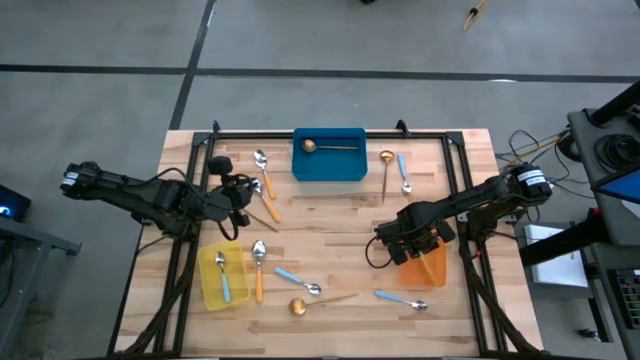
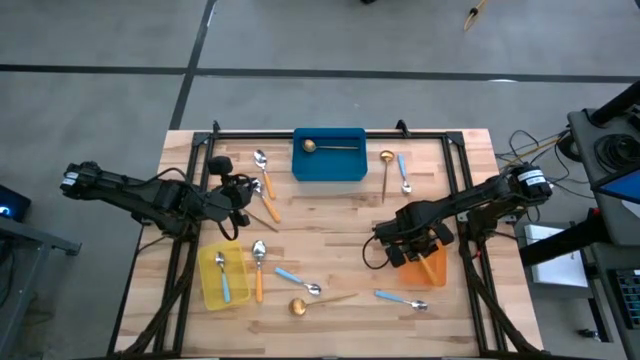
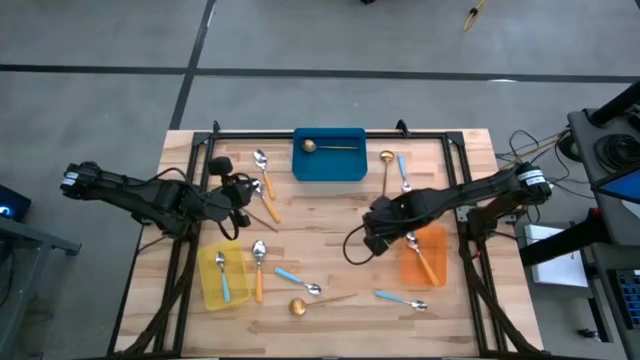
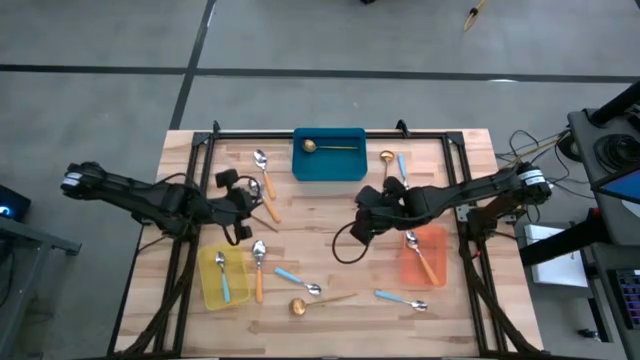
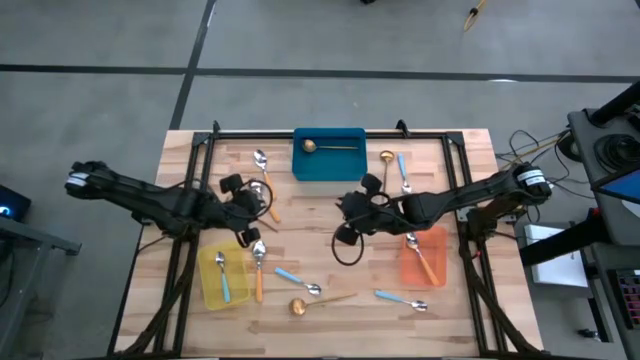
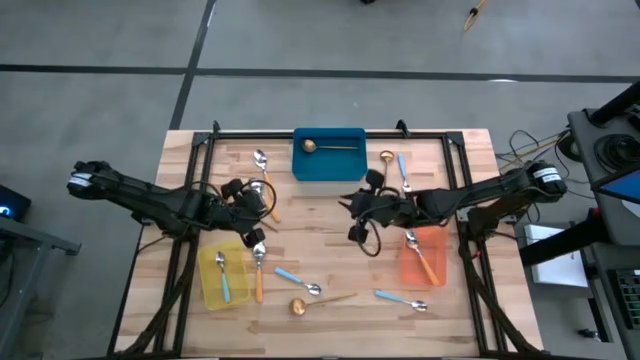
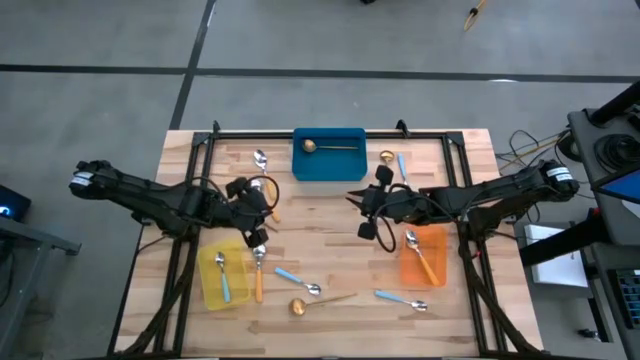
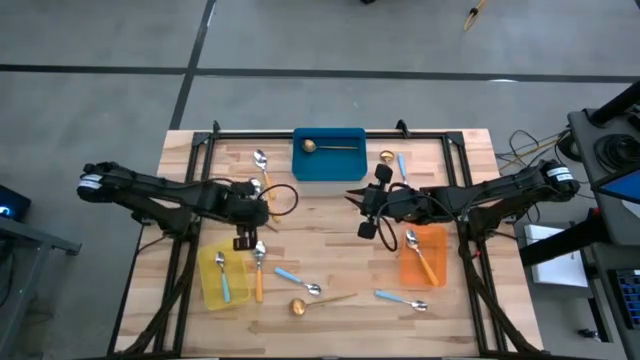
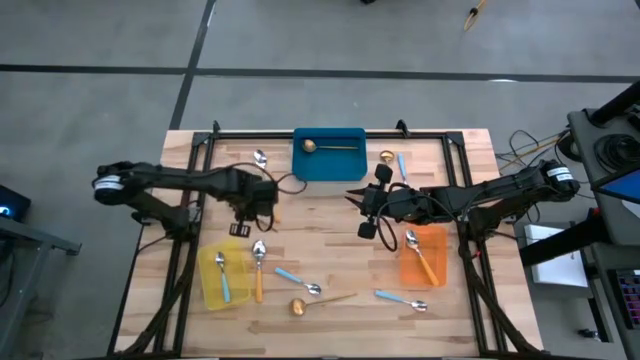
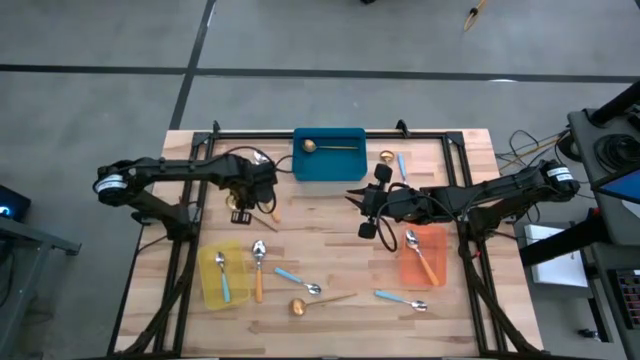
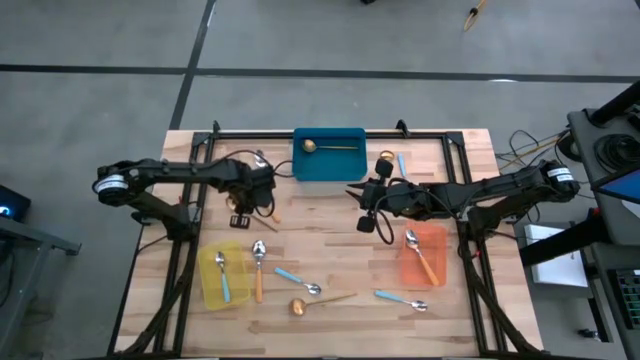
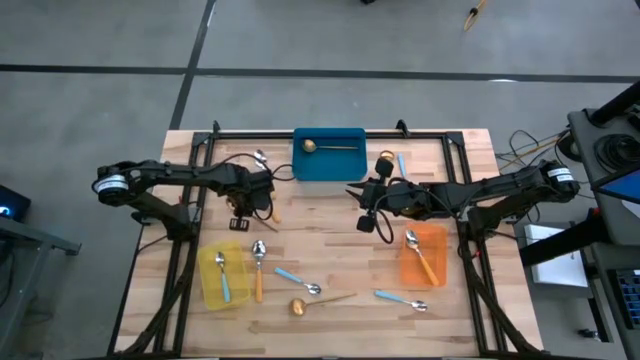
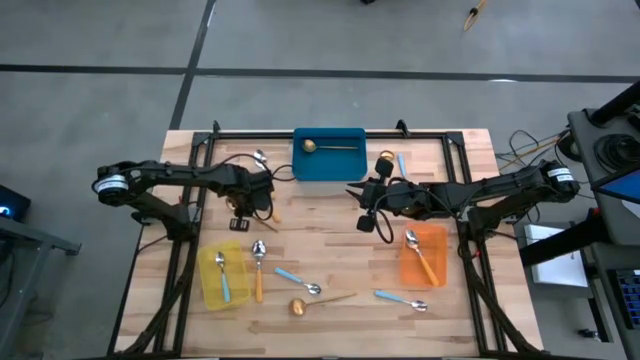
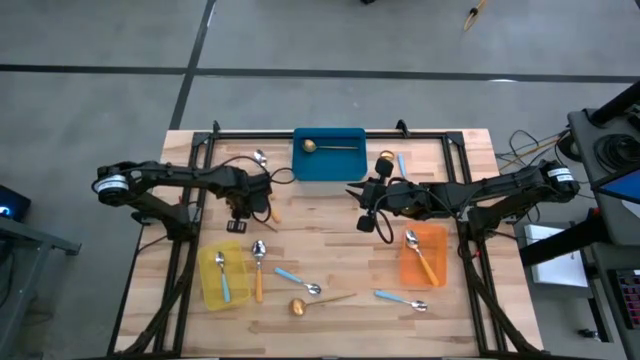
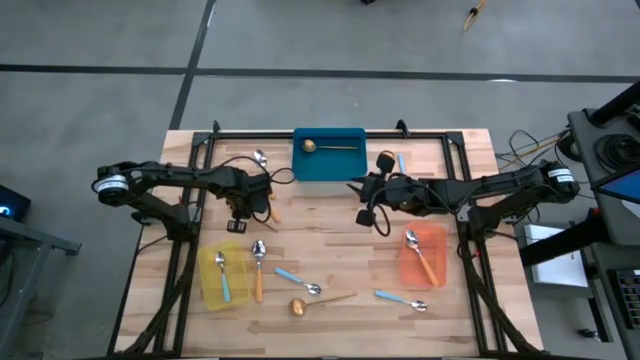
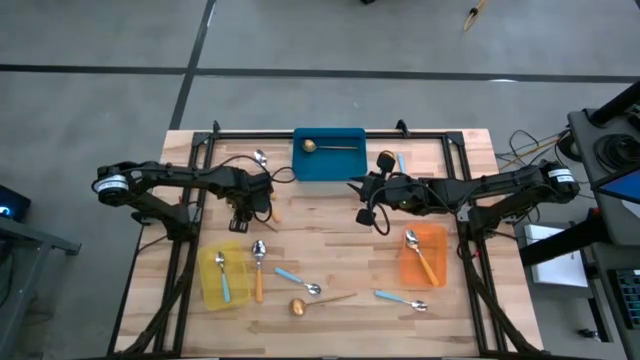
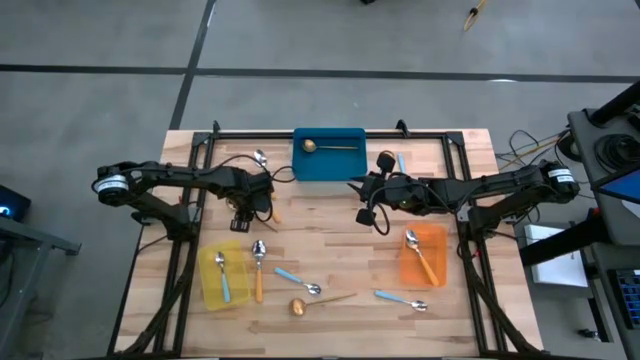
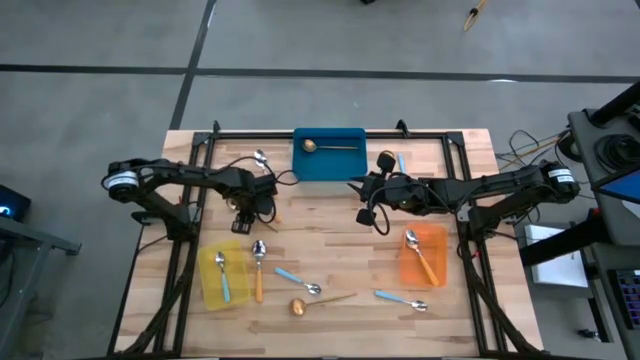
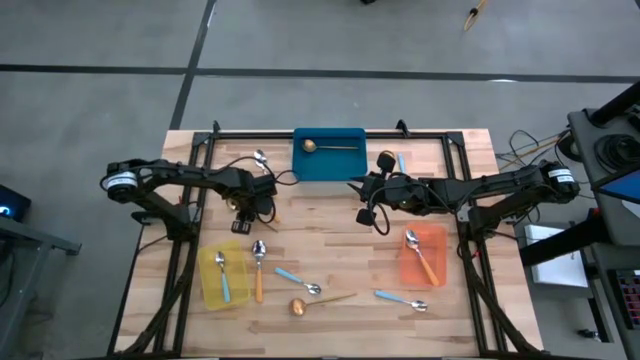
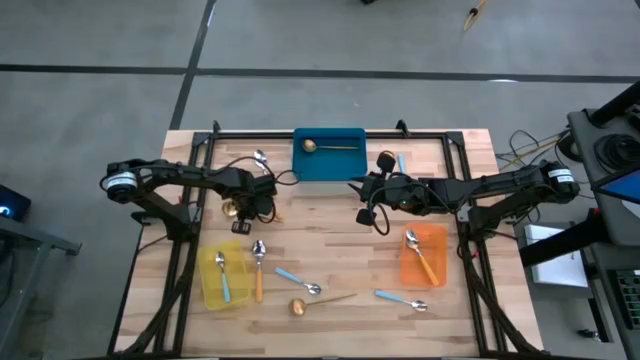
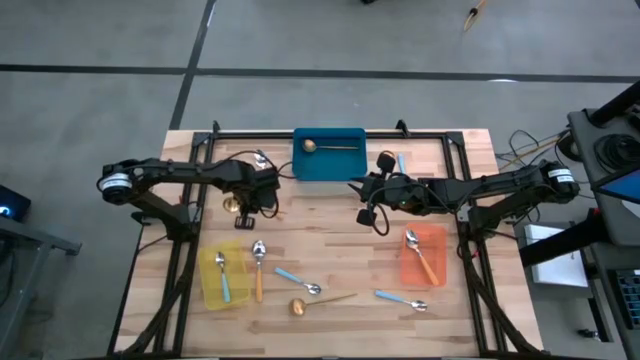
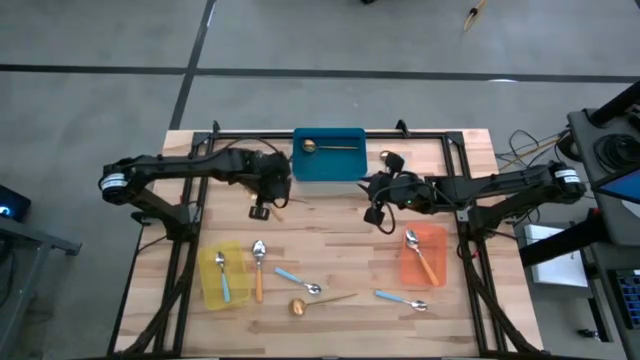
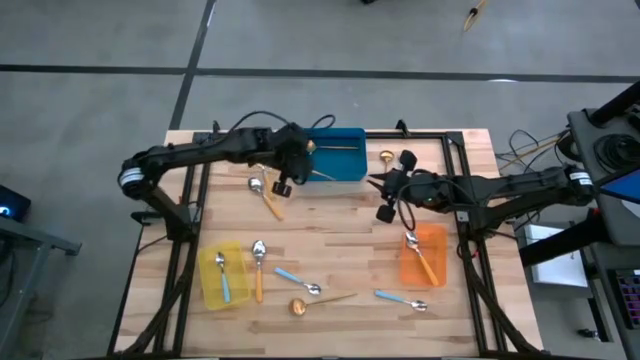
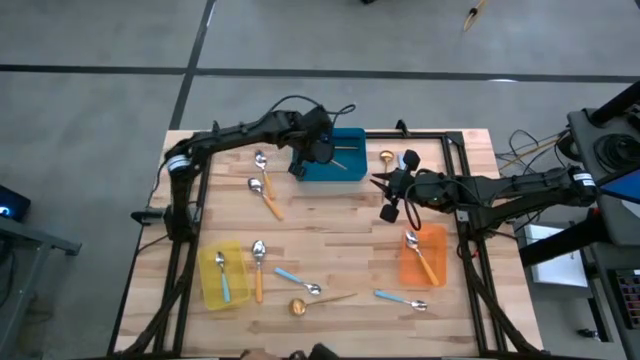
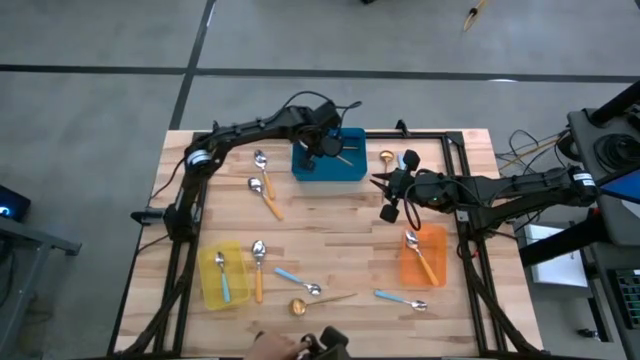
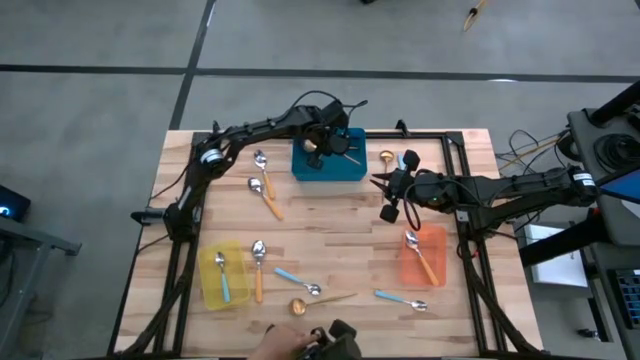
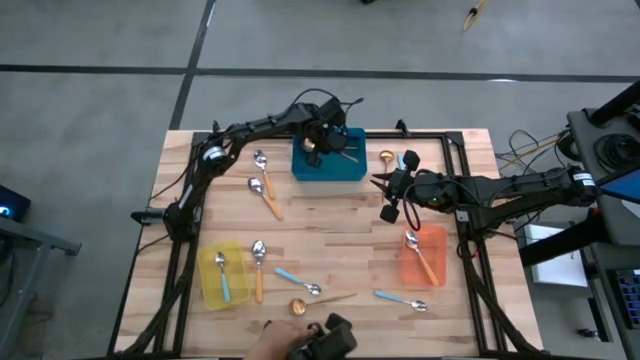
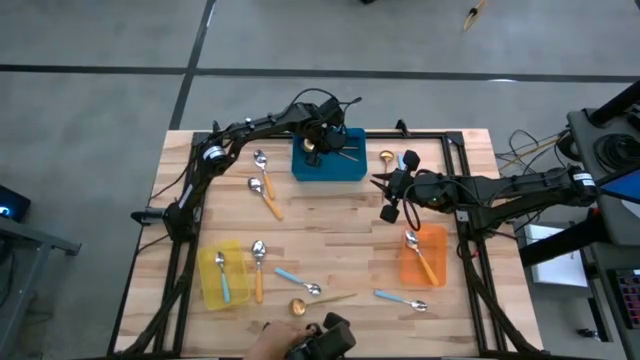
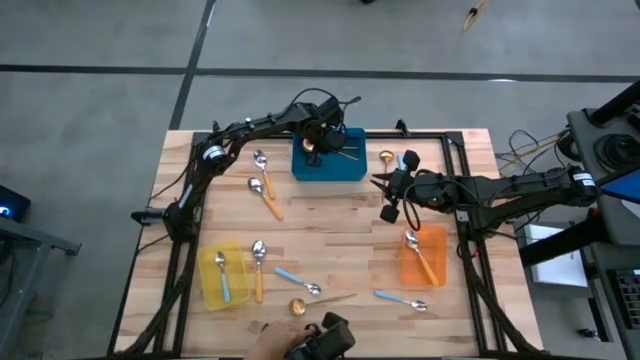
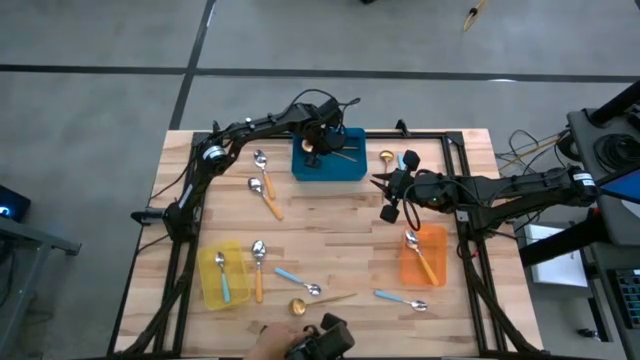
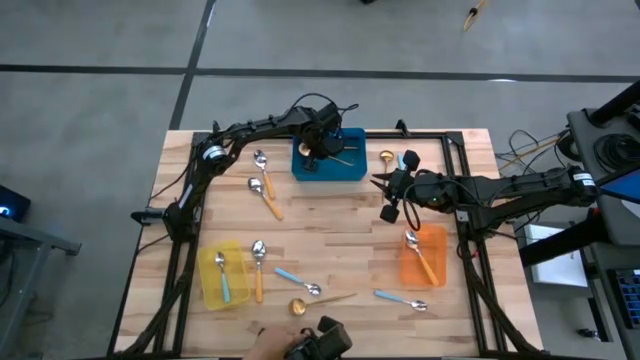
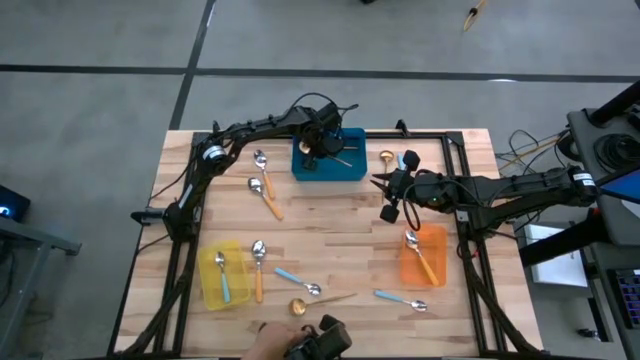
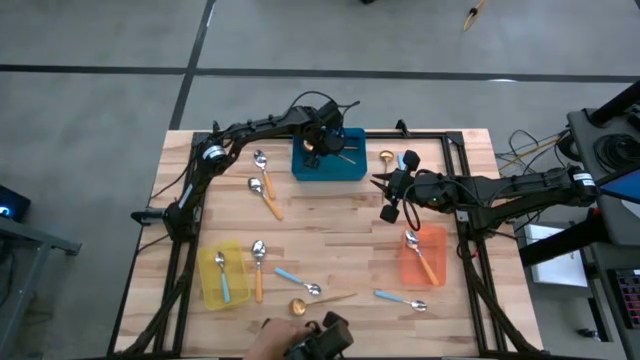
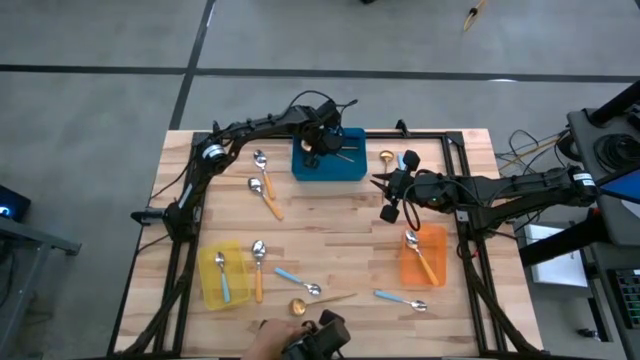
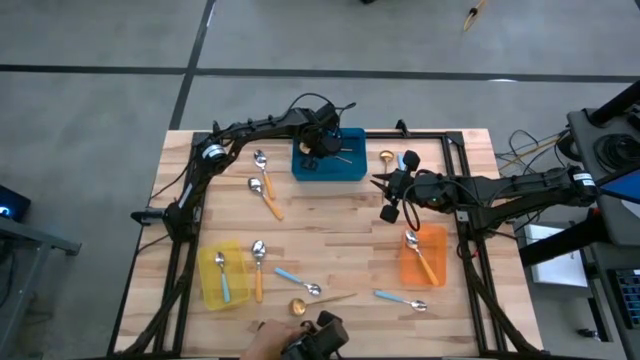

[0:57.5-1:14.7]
Task: Sort silverware by color (type)
Put the gold spoon into the blue bin

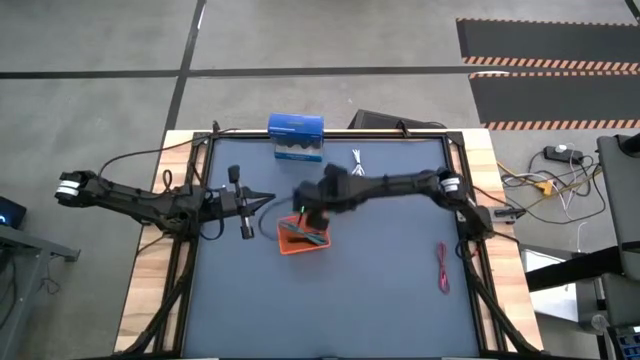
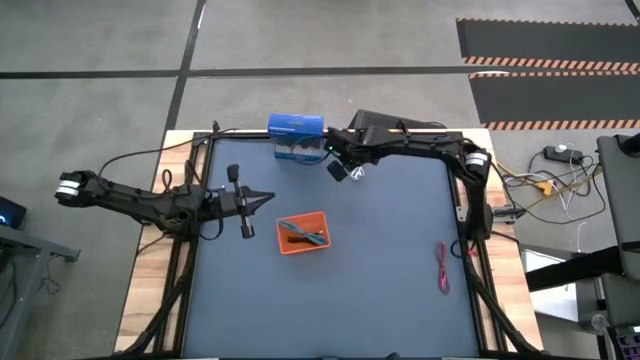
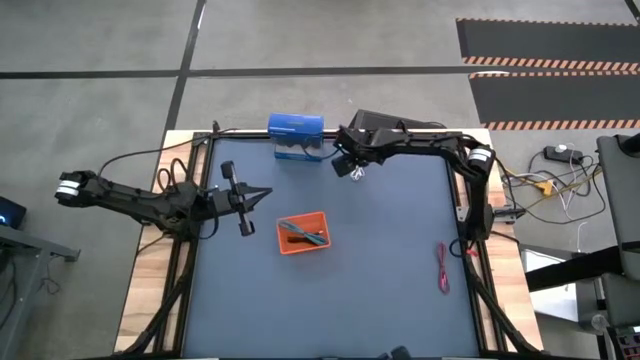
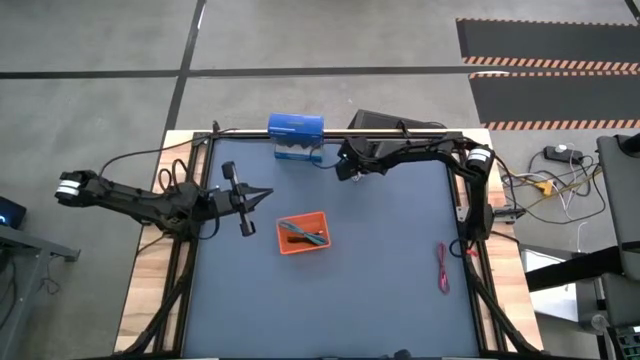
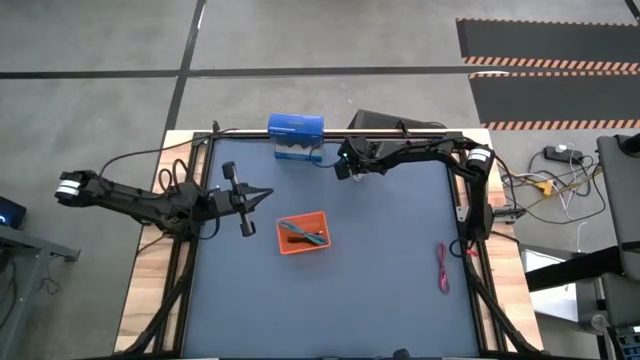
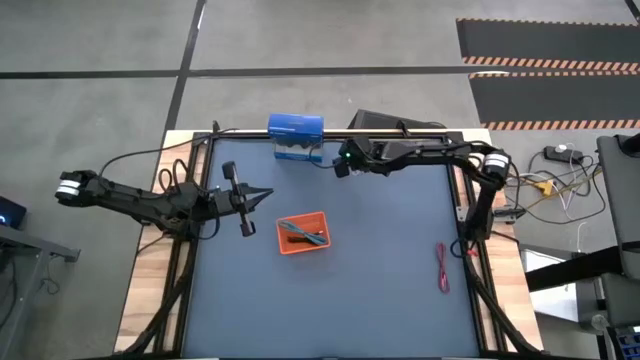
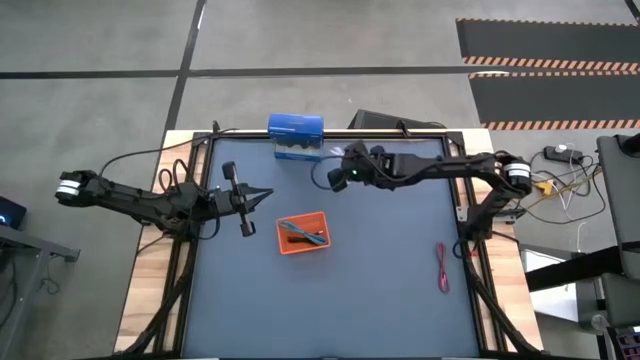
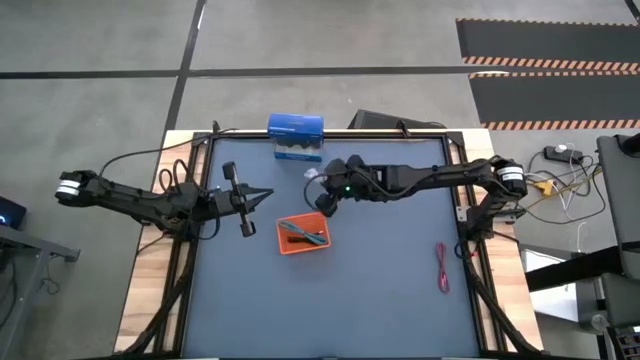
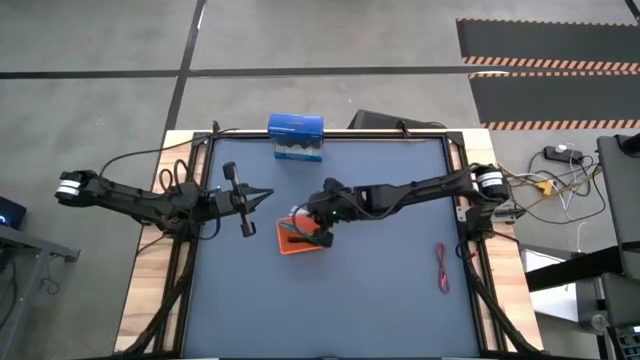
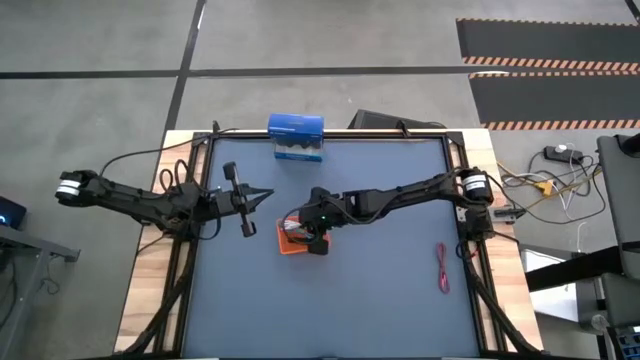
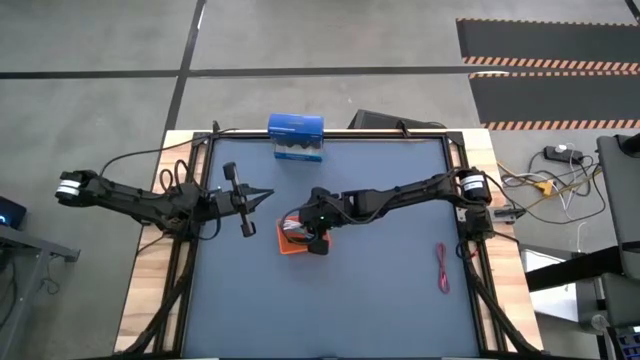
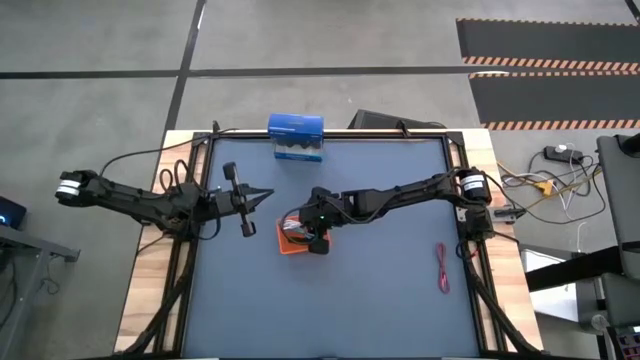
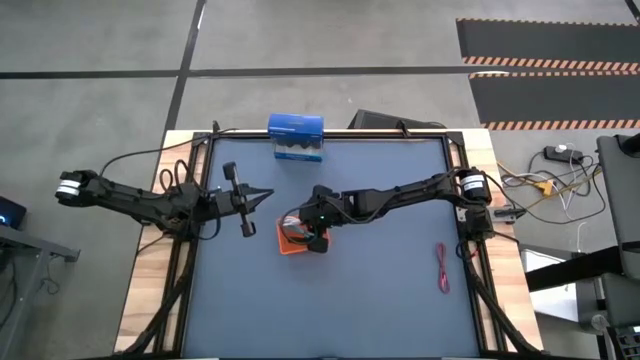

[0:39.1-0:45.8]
Task: Pick and place USB-C Cables
Put the white charger cable into the orange bin
